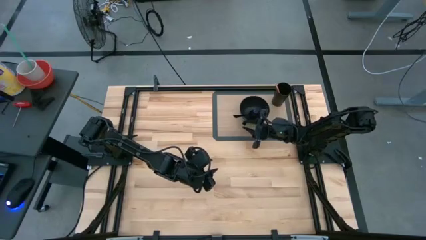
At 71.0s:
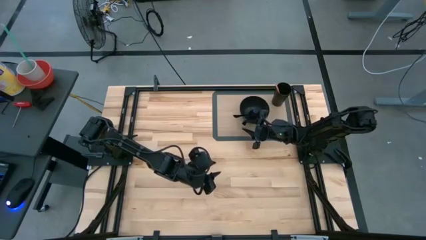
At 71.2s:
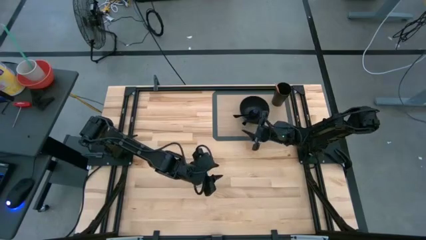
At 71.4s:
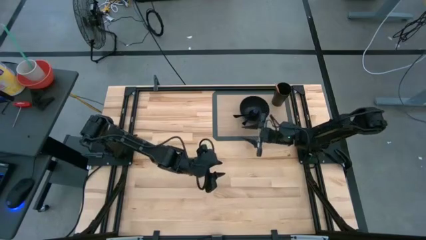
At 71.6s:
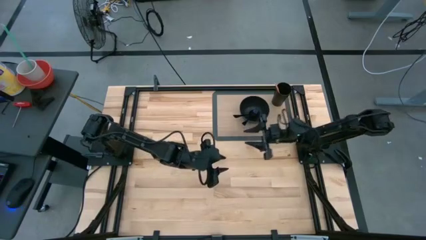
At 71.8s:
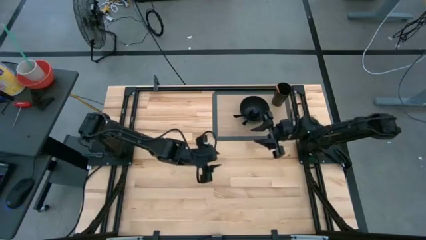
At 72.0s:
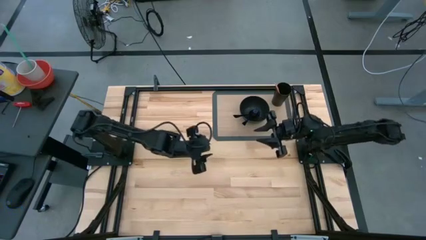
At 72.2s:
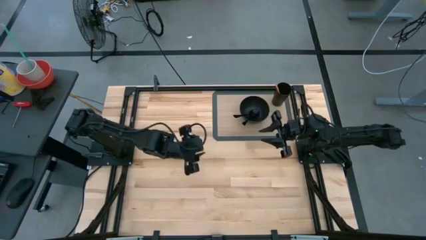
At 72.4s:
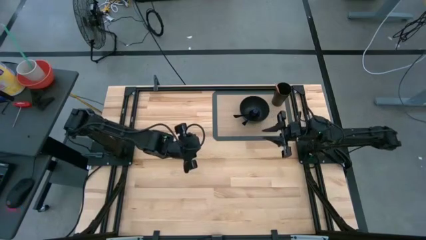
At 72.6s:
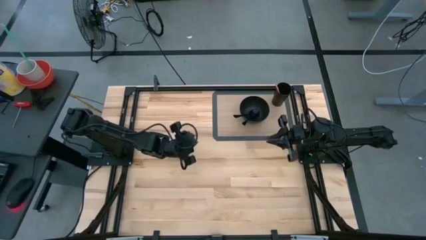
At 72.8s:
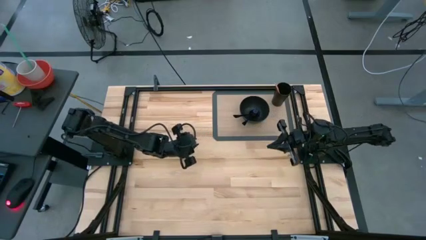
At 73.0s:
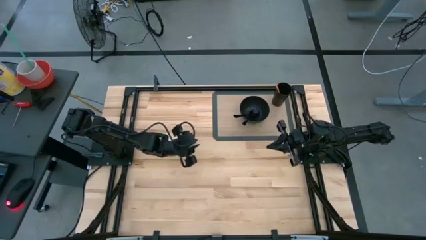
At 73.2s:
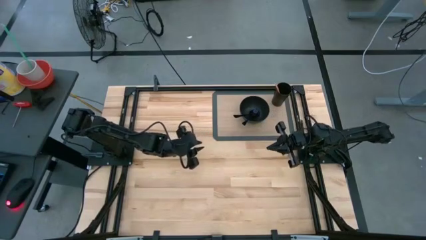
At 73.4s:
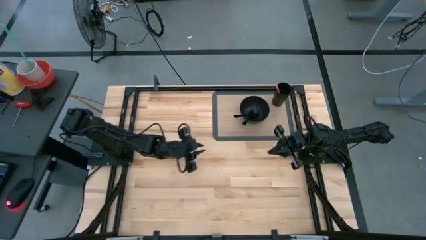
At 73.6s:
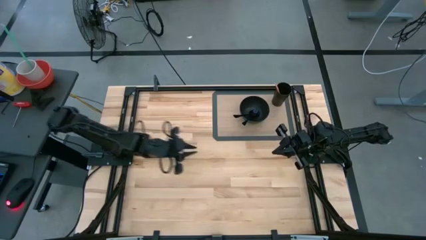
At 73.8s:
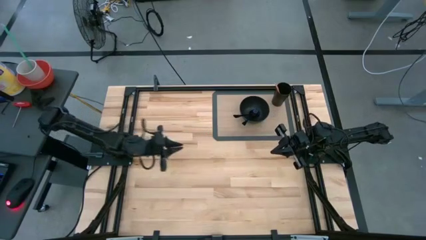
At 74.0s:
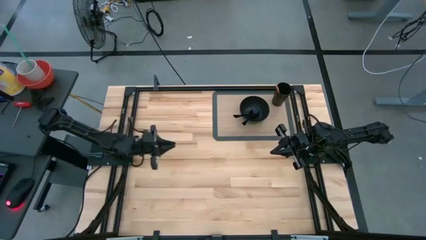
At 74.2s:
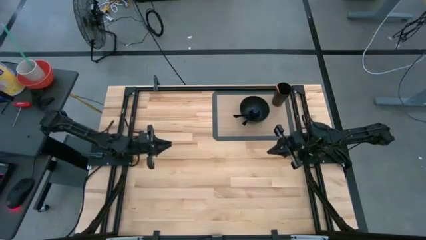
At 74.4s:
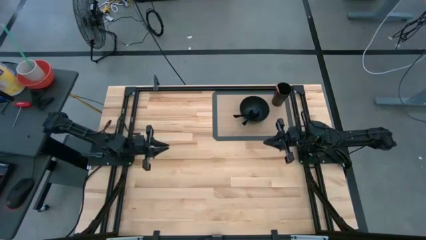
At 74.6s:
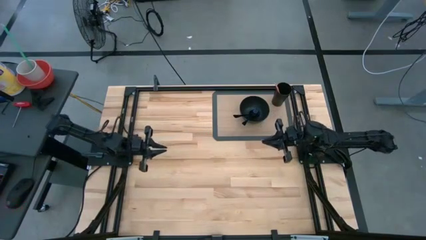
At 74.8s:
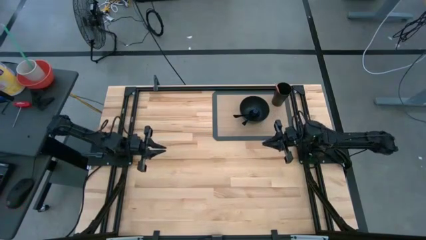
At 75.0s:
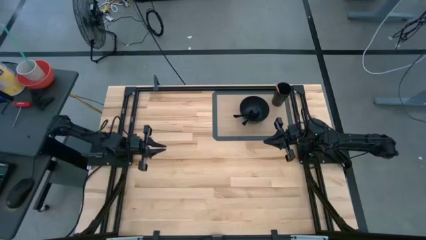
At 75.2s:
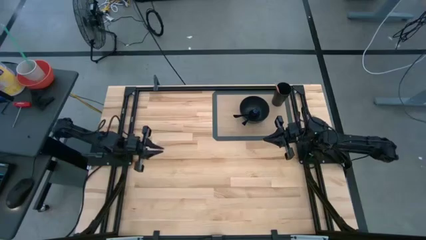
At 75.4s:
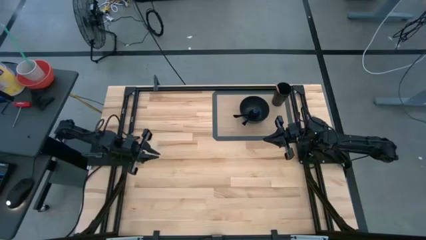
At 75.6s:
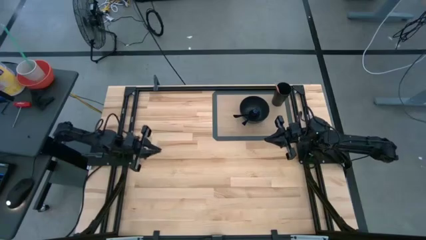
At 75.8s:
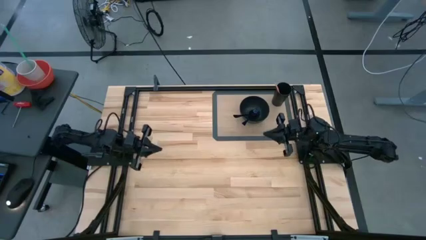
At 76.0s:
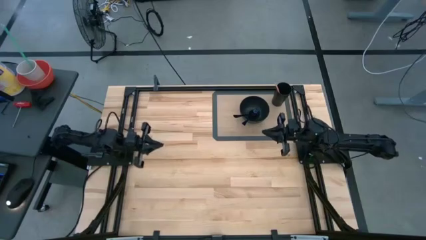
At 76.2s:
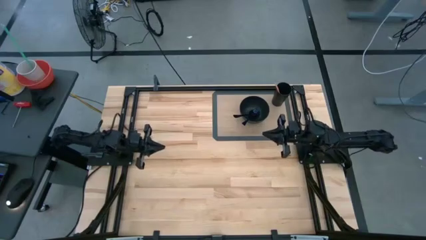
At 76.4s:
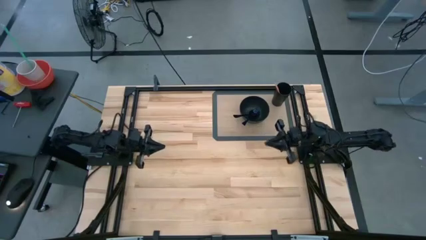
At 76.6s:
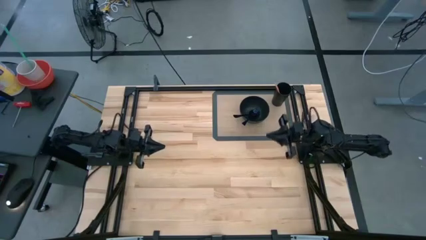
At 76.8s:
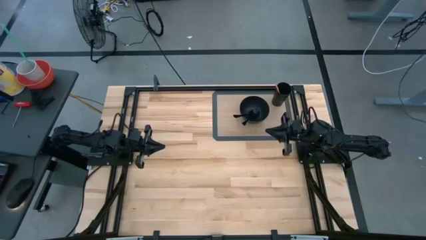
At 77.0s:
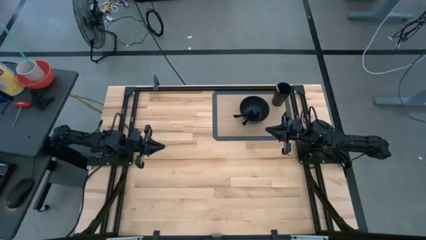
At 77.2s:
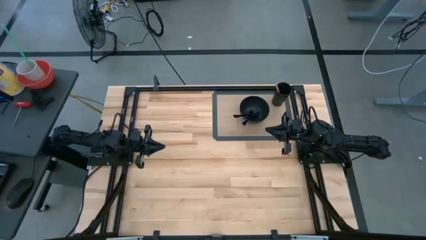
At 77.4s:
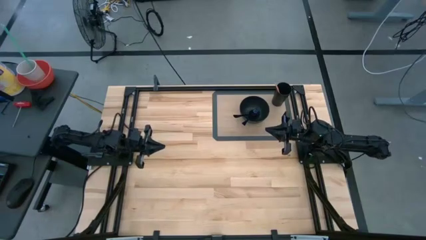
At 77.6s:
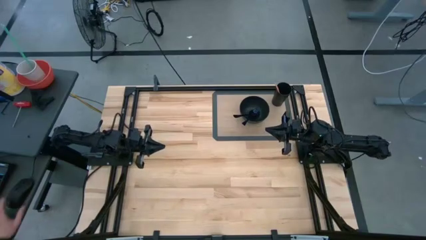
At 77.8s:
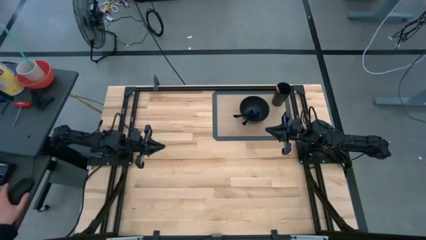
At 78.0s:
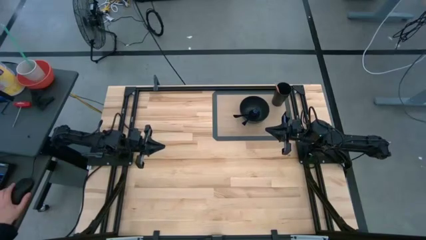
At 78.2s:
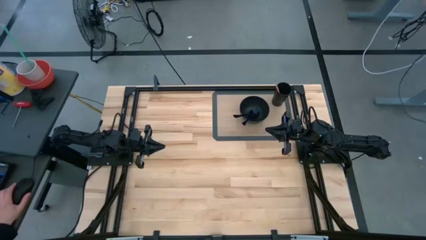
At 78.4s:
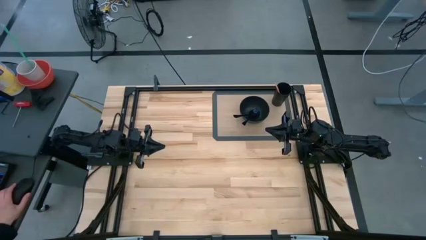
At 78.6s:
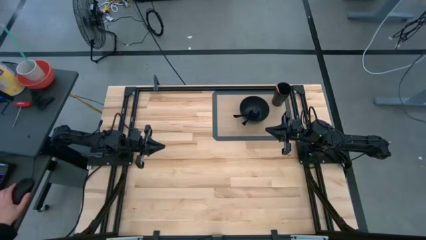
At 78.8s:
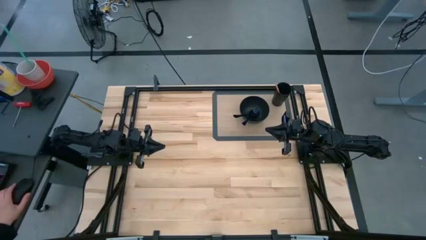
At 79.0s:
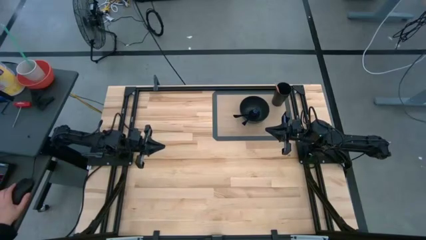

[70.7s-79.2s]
Task: Pick & Place Utensil
Return to Home Position

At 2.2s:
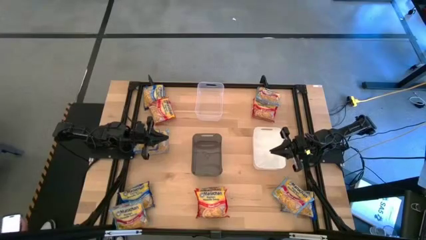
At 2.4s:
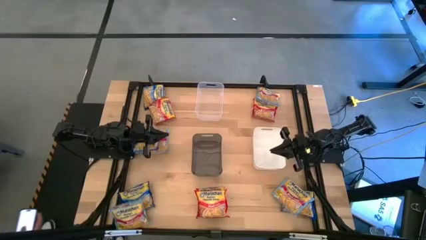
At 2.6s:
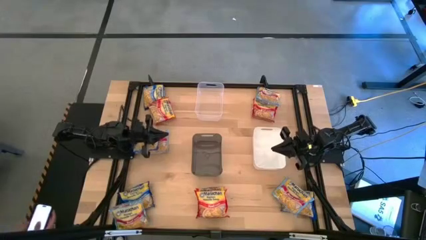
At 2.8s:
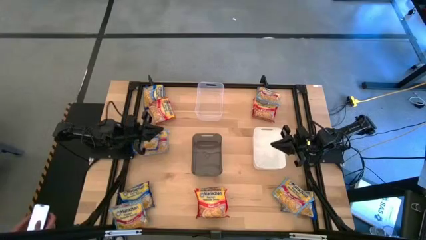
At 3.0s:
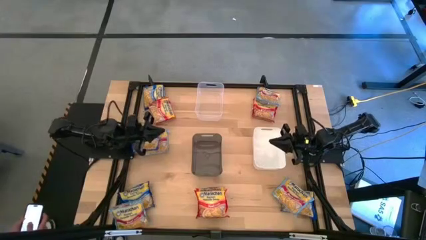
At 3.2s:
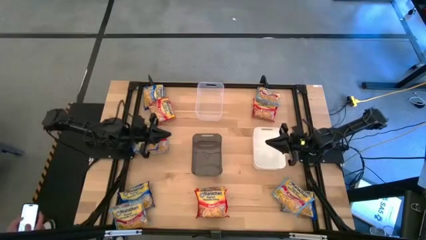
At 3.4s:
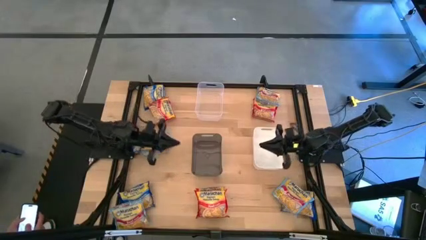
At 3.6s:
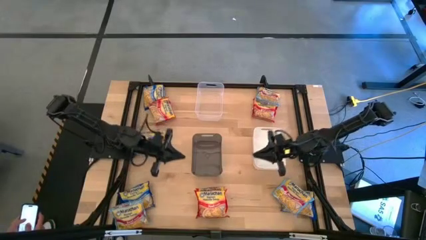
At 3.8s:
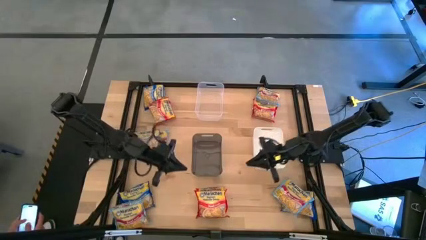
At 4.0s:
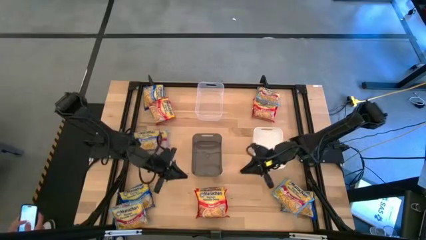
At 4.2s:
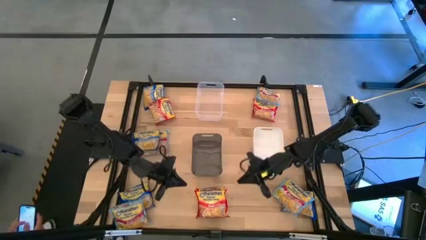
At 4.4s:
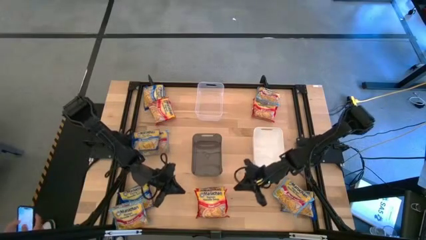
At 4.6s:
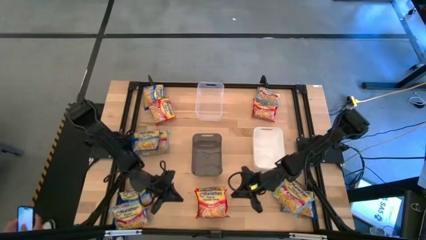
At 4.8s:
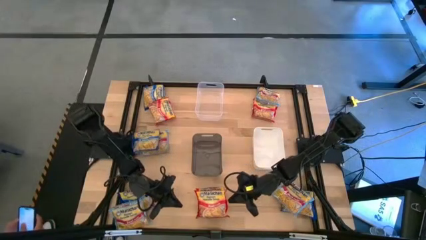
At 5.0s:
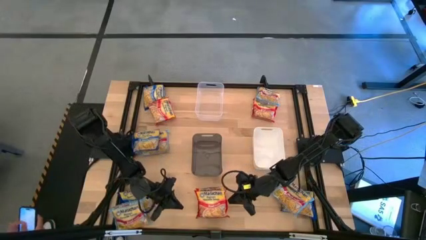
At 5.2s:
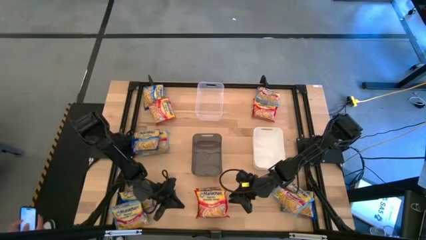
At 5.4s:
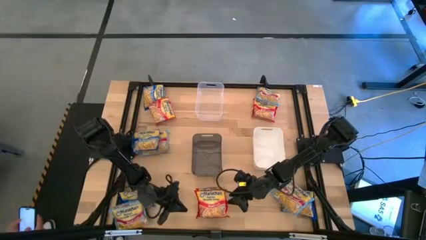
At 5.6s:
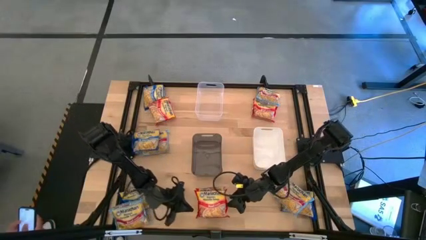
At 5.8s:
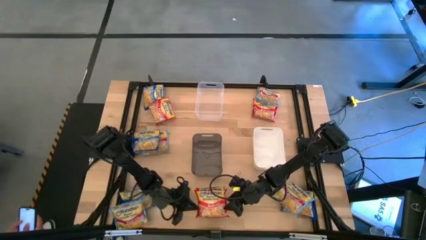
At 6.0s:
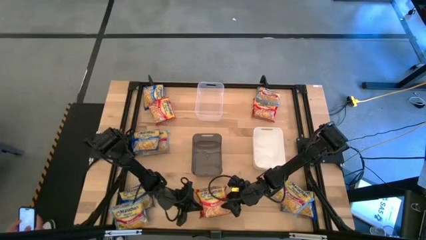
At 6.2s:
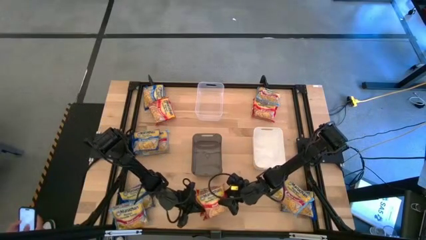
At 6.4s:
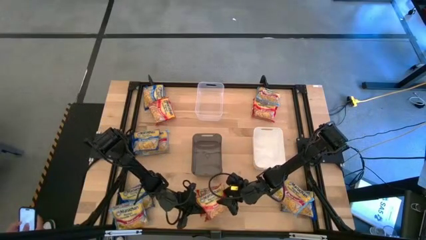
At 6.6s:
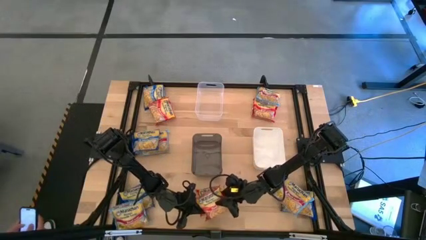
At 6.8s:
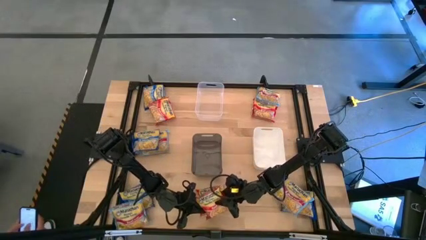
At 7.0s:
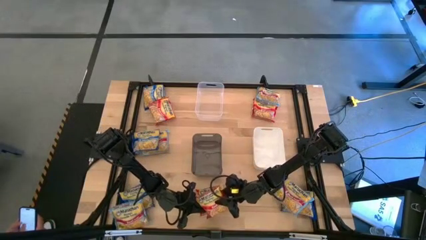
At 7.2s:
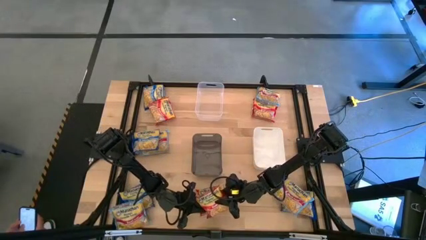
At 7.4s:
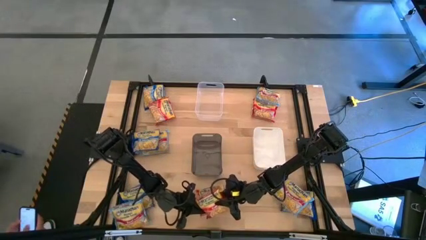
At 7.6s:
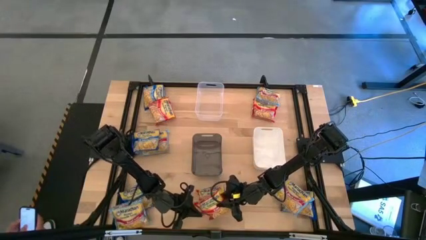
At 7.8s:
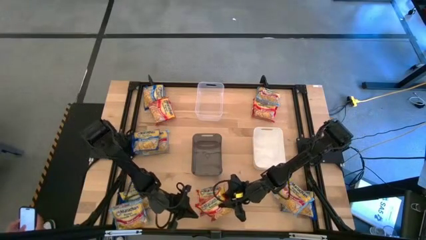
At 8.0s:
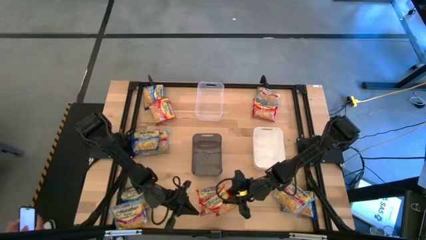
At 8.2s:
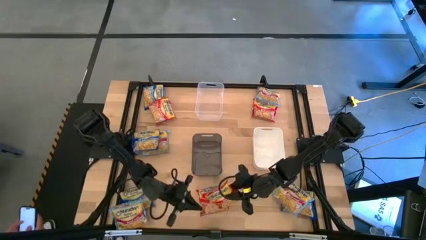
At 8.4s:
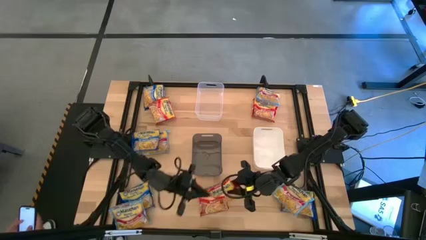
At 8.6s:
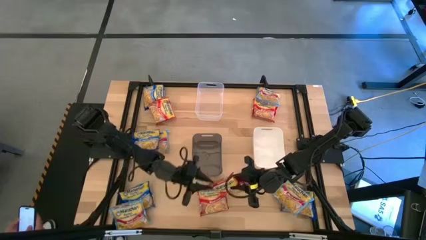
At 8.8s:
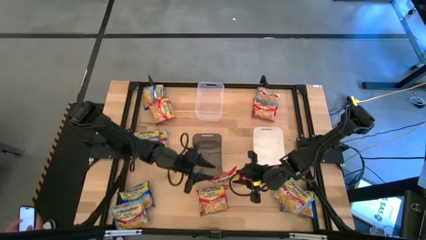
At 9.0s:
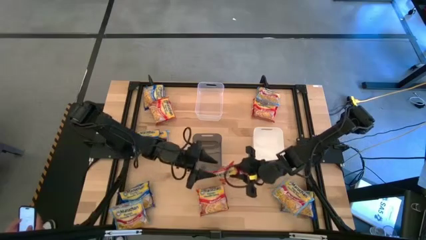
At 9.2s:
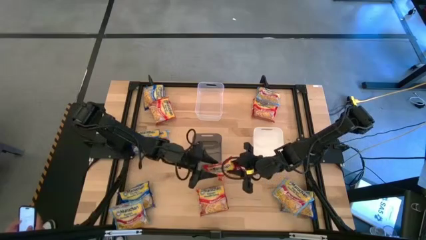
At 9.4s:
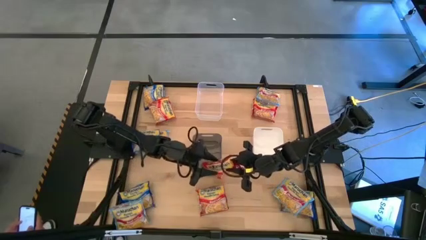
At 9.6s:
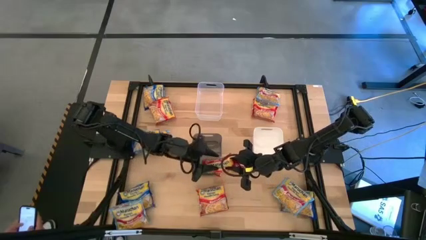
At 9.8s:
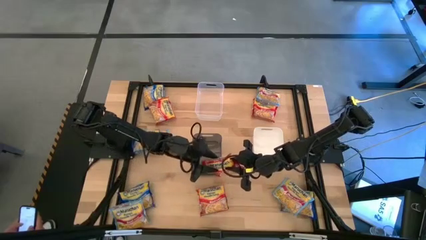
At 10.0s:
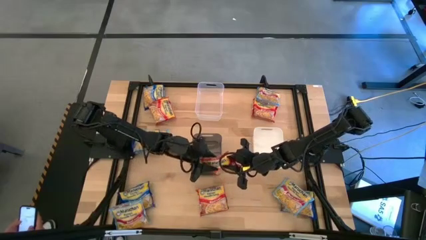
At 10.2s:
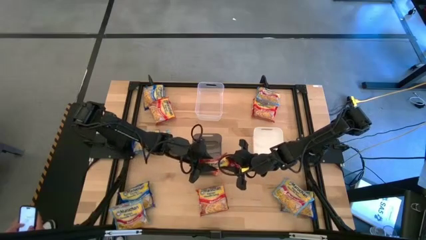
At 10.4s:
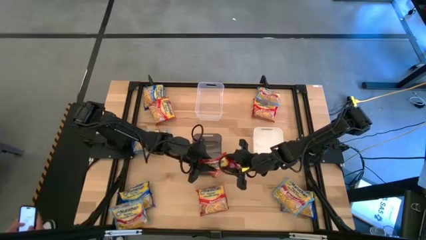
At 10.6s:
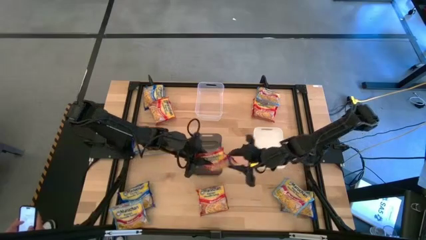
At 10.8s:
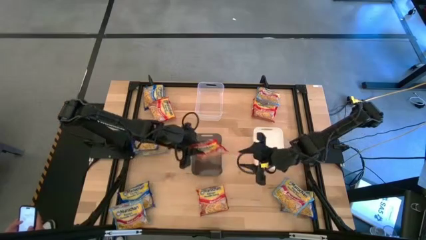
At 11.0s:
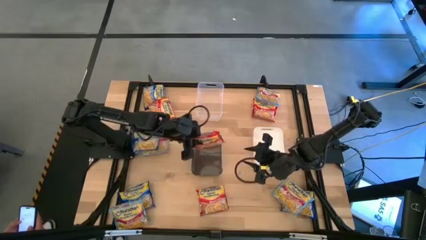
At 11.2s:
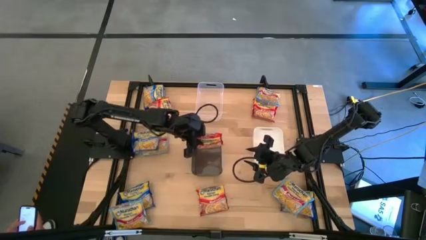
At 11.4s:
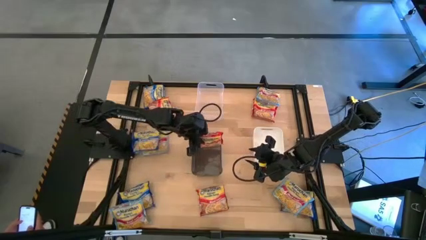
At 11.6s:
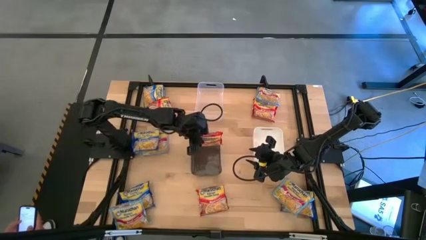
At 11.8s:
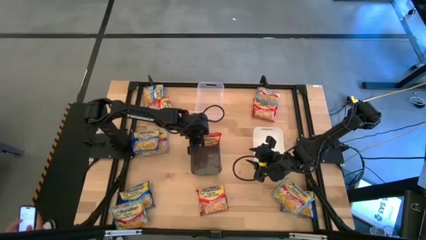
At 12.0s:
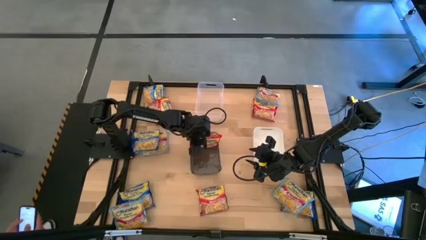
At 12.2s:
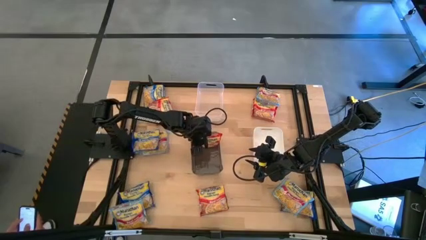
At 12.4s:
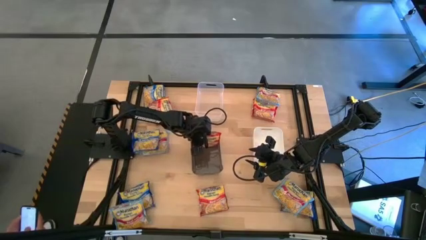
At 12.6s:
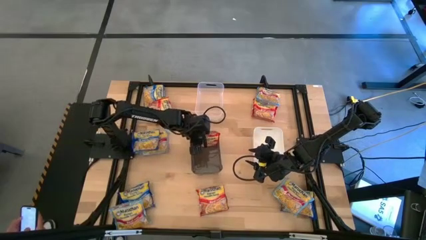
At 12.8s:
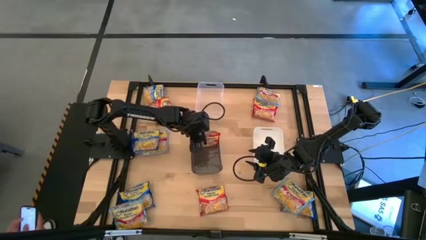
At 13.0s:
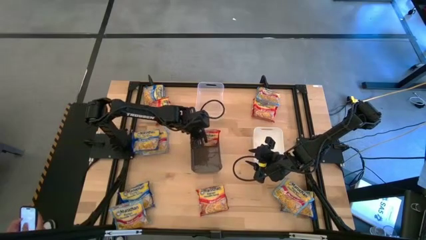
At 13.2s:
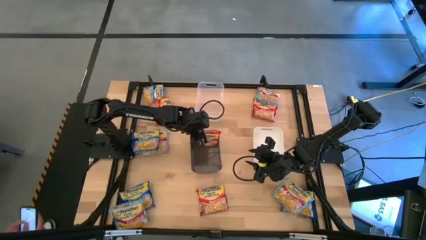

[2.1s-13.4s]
Task: Sort Maruchan noodles
Put the red noodle pack into the gray bin
